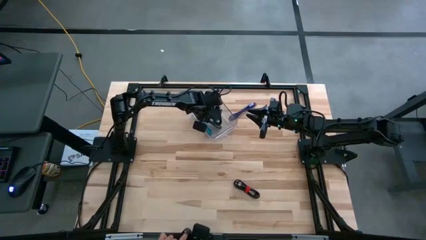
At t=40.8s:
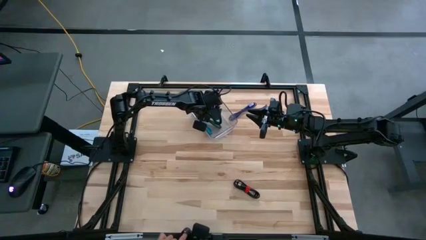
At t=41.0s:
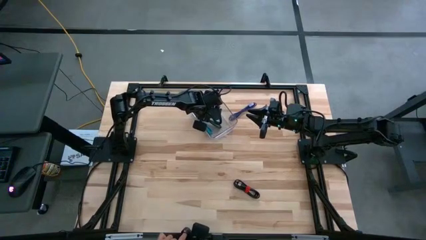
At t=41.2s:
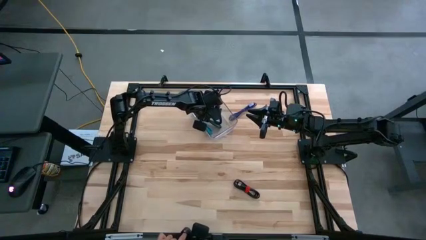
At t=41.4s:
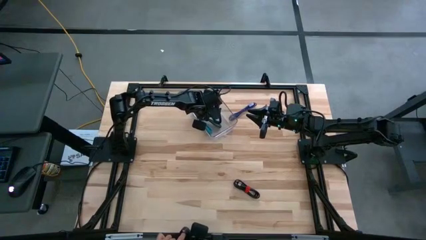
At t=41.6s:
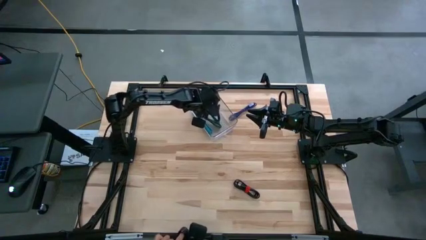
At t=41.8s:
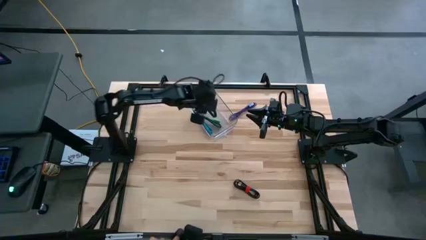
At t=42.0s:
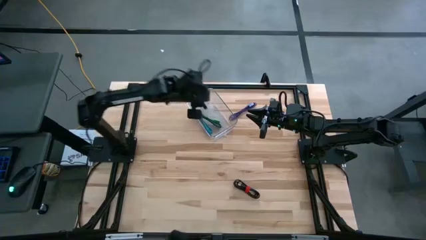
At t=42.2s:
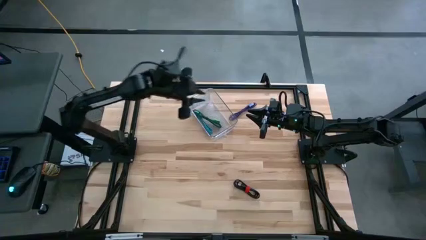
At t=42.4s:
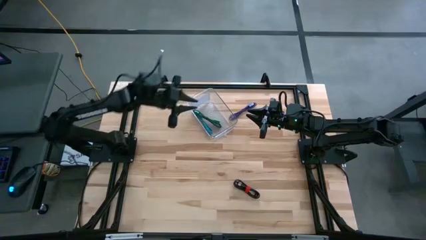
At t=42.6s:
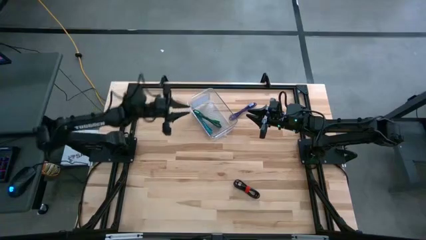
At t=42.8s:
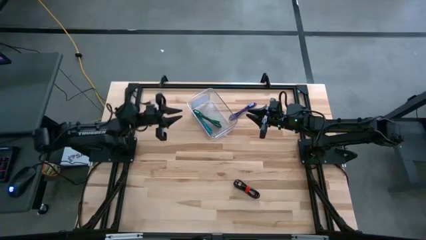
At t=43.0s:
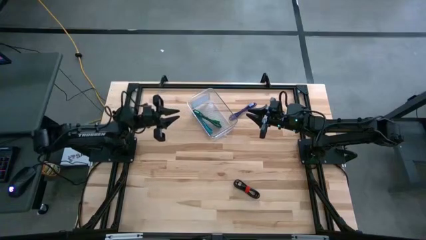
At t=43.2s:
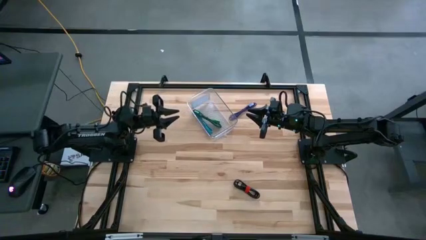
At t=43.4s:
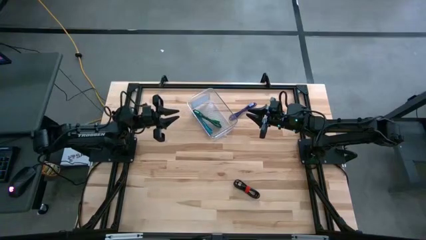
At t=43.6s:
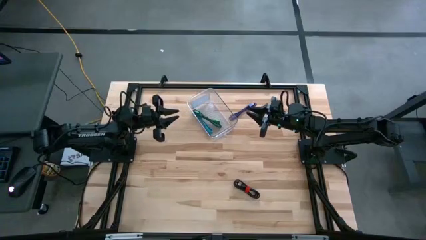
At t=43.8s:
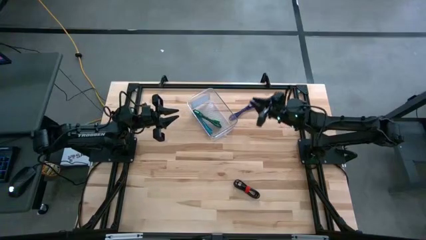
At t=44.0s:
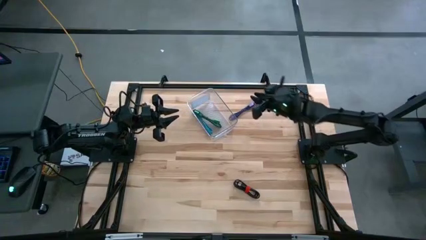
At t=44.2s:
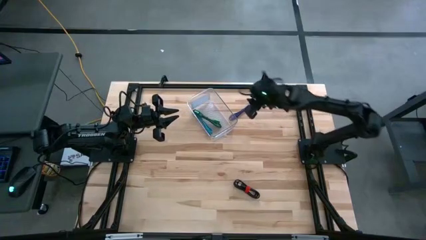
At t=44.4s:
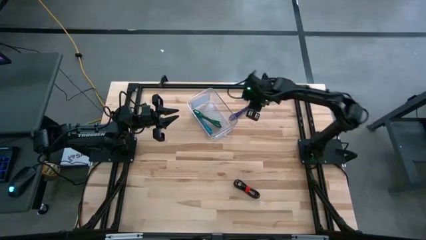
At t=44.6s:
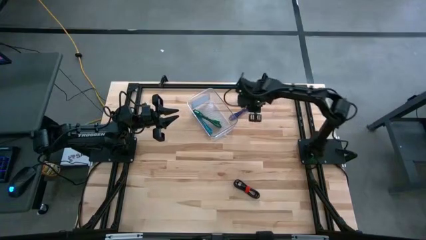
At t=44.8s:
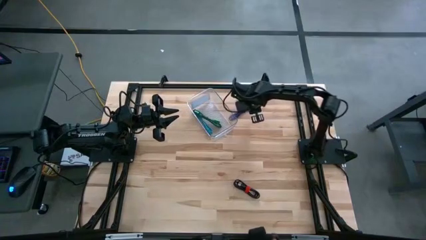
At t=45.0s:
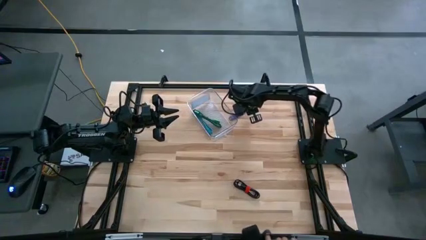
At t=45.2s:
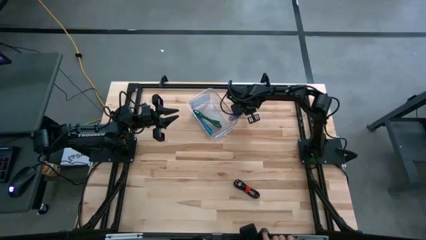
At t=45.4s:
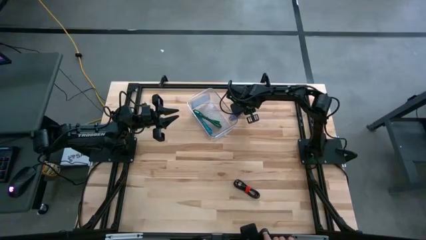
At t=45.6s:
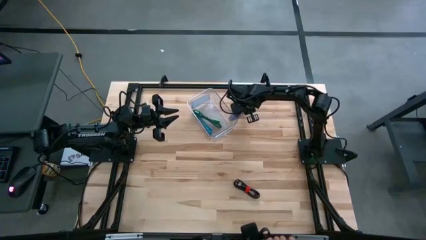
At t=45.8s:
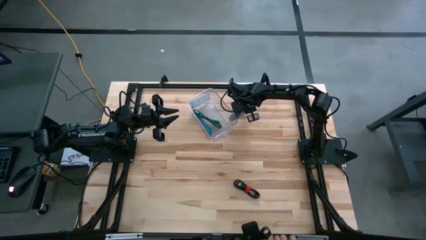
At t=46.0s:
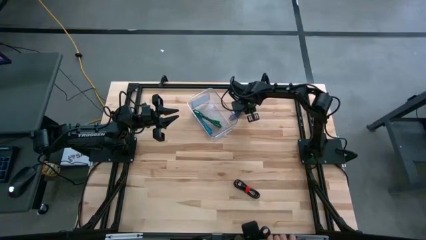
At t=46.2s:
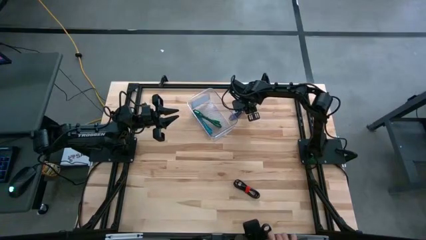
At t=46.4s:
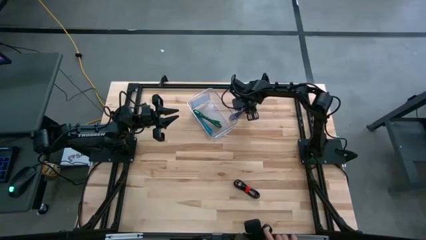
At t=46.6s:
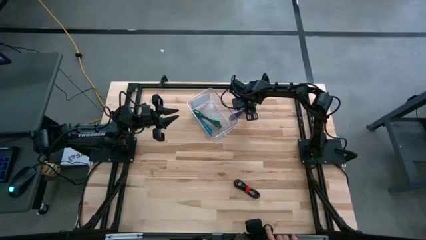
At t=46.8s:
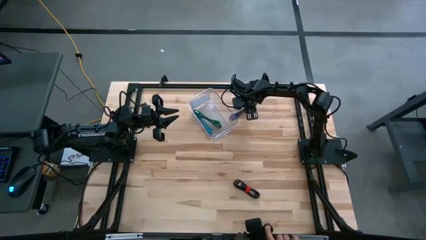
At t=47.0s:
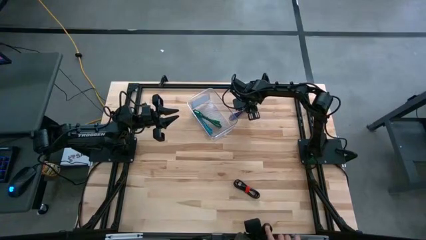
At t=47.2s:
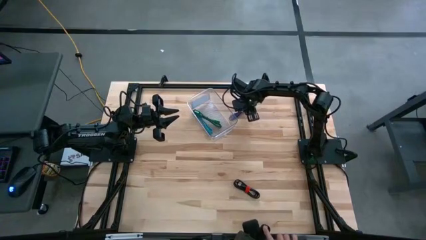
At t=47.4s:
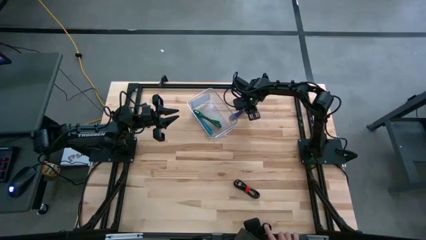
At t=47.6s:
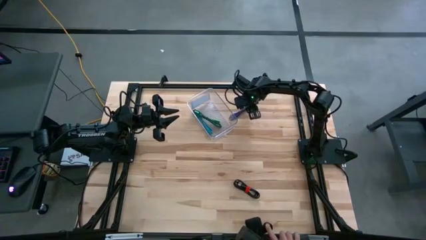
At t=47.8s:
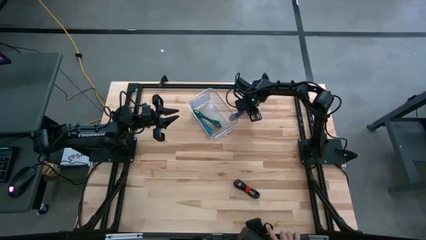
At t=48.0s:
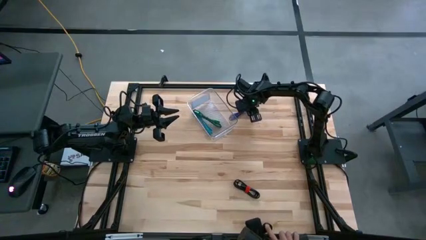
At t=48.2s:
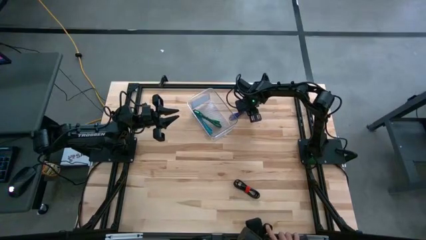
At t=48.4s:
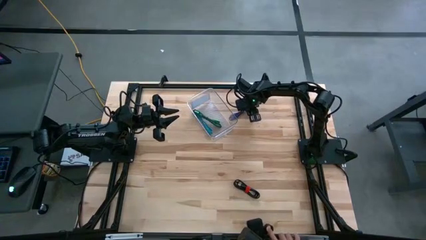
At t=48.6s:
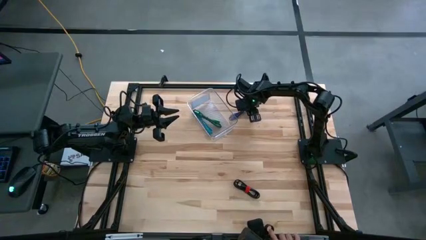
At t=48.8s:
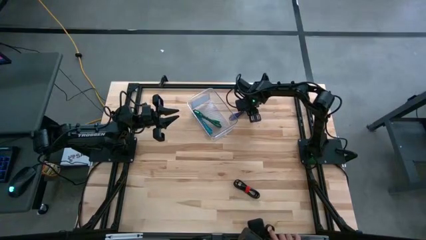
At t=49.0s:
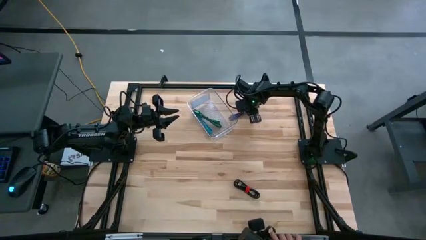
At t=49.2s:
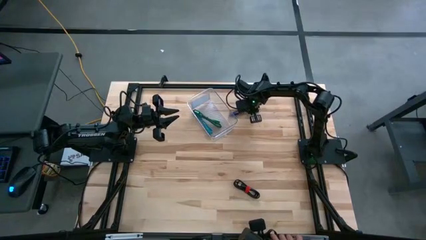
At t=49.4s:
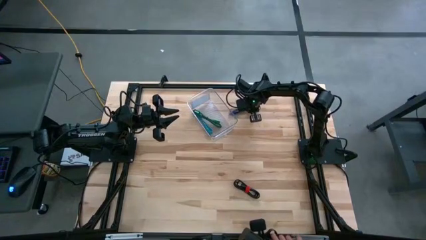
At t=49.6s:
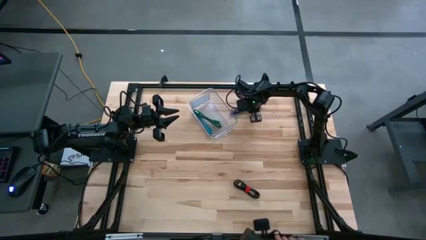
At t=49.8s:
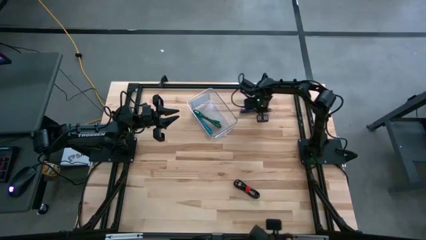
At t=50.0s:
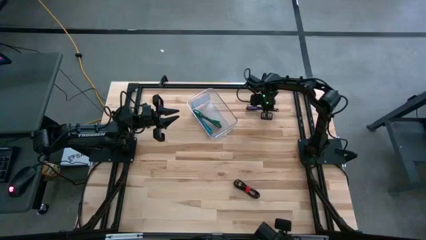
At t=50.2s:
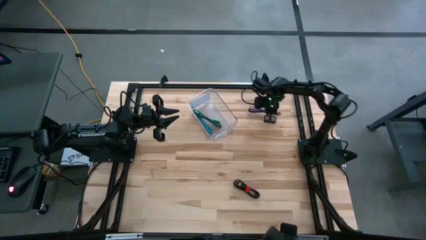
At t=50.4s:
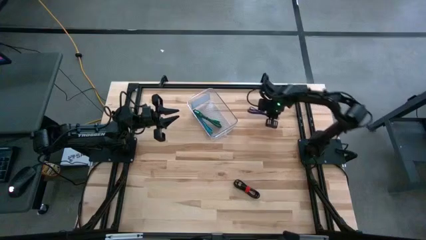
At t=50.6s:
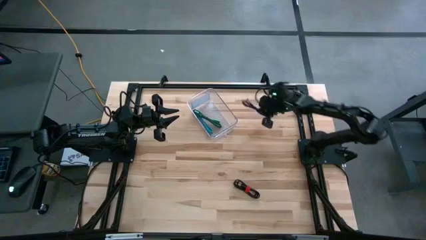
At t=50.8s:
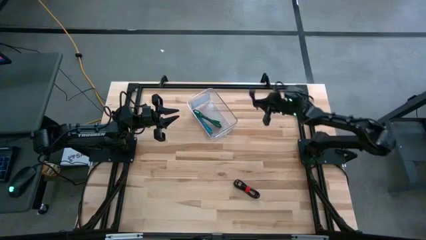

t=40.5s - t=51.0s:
Task: Pick and place USB-C Cables
Put the purple charger cable into the transparent bin

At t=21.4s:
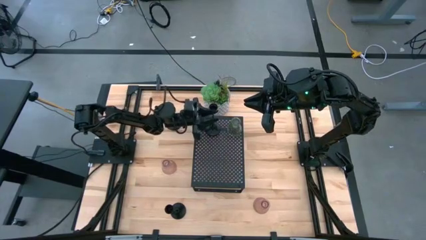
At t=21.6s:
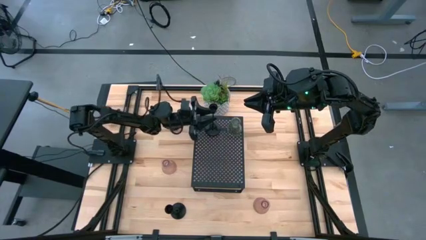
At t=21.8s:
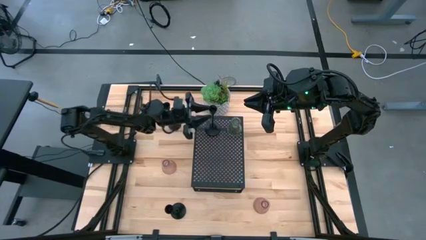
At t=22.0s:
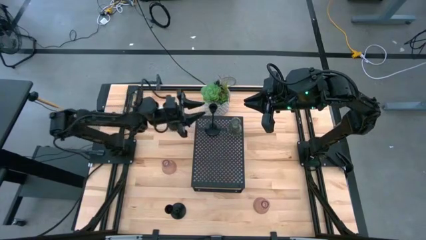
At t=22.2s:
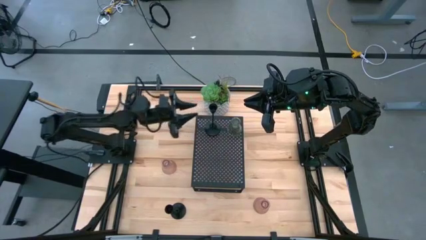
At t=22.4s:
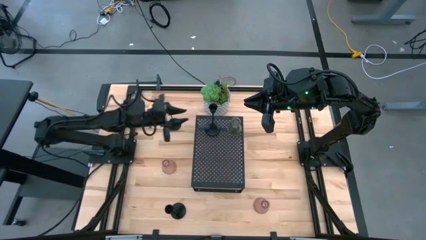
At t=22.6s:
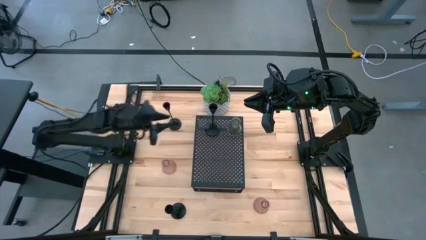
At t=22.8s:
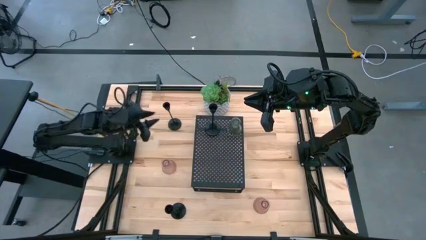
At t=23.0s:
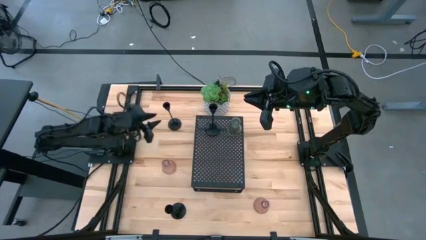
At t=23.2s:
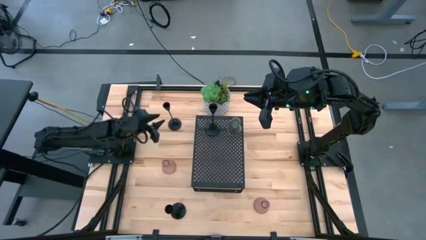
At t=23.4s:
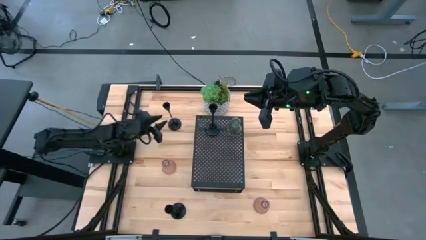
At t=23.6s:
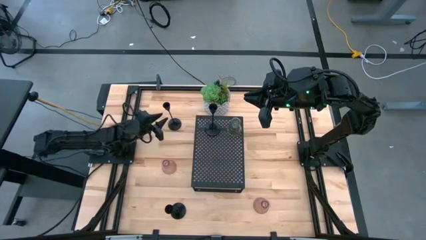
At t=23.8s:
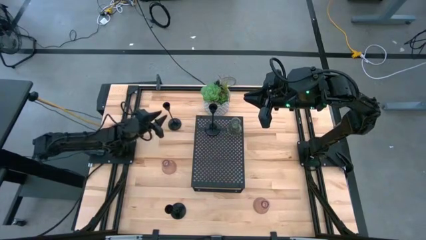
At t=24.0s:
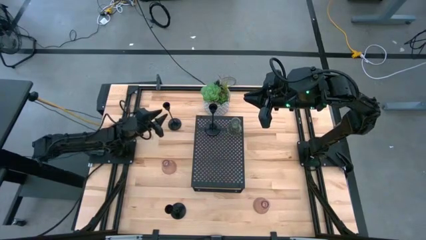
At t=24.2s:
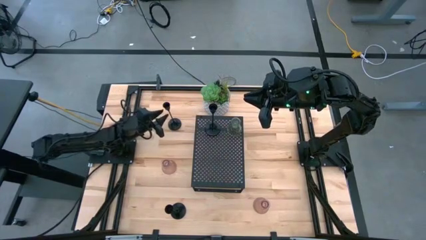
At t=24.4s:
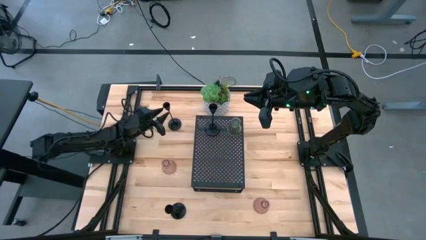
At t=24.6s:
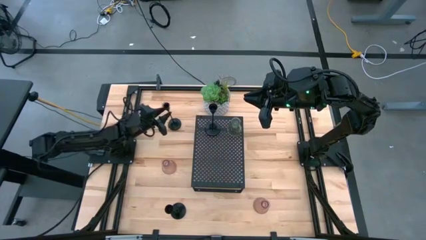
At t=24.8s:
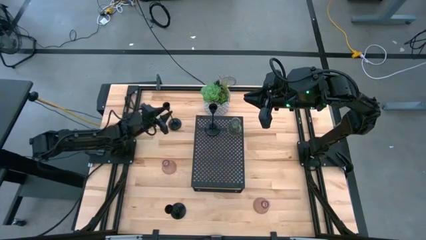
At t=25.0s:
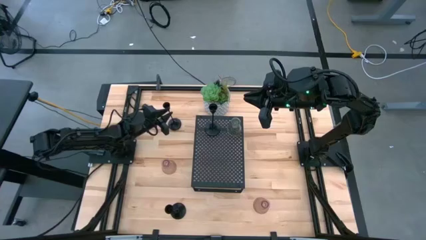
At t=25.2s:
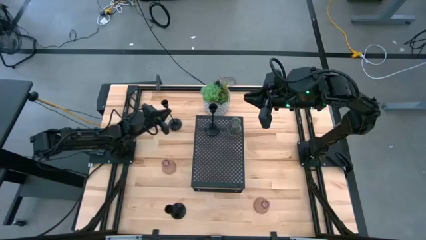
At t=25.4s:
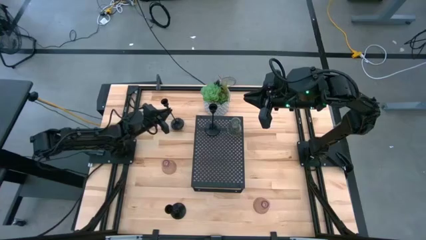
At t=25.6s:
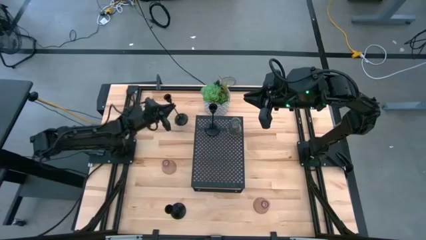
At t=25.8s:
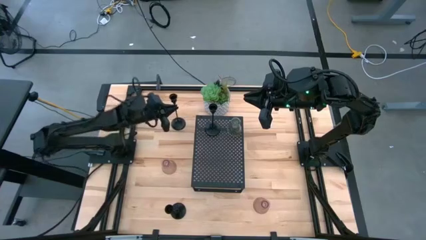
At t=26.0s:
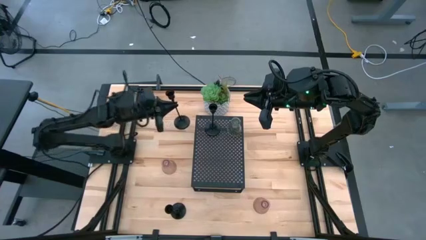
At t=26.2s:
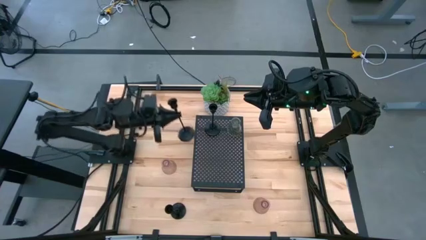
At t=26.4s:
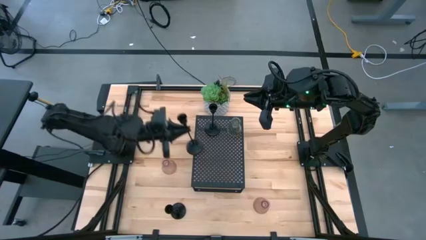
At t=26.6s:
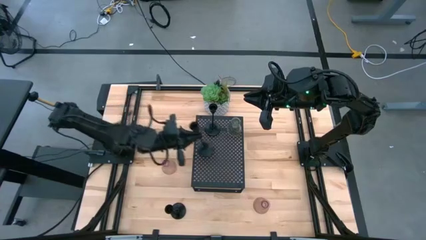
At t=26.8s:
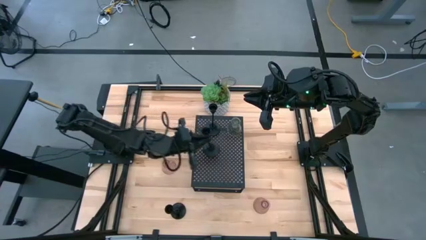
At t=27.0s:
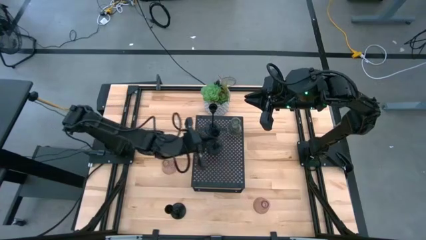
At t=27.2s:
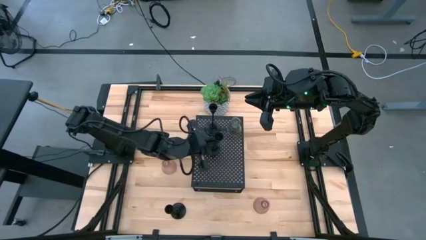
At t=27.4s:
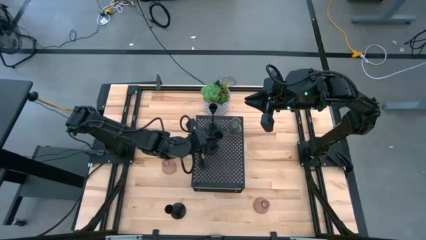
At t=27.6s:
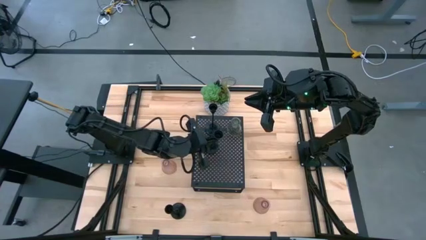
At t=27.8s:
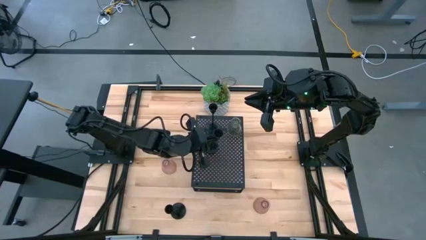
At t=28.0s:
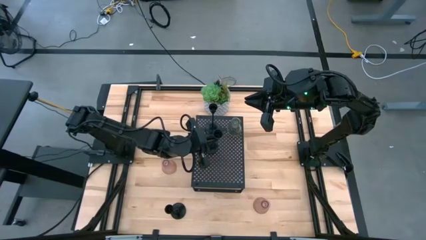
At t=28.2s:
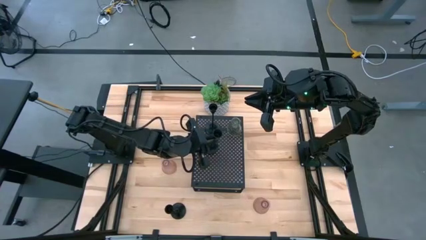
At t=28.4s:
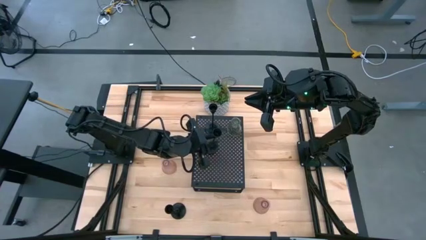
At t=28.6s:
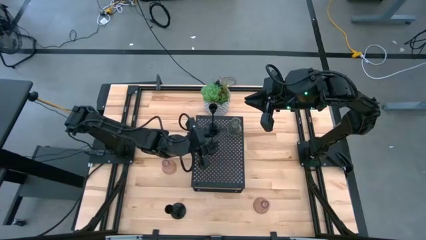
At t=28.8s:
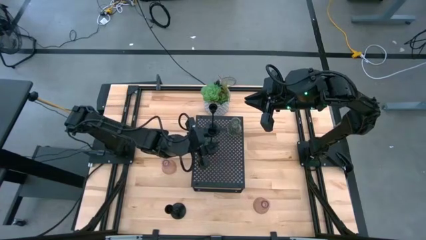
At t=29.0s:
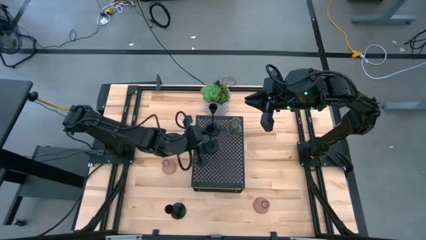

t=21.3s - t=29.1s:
Task: Pick & Place candle stick holders
Align the black candle holder on the top with the black candle holder on the shelf
